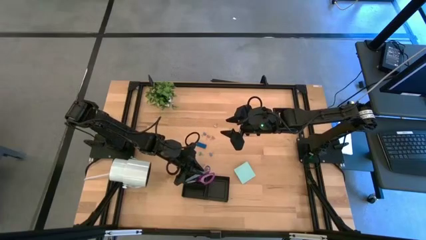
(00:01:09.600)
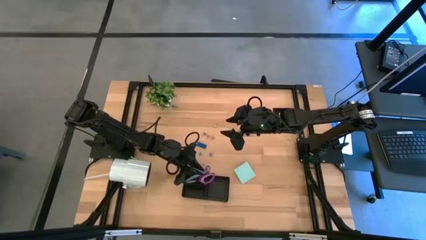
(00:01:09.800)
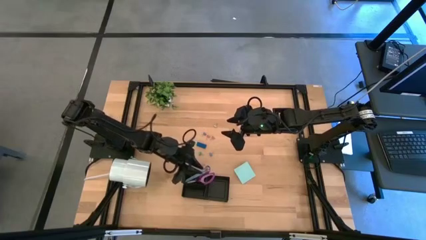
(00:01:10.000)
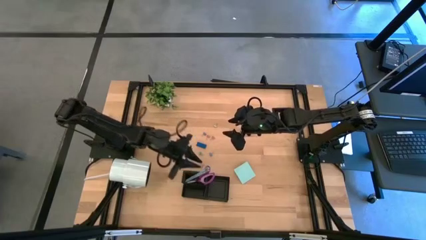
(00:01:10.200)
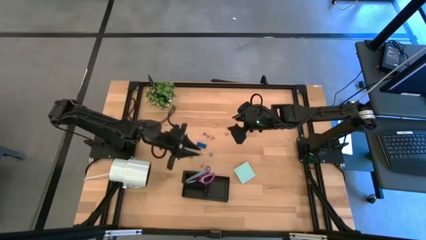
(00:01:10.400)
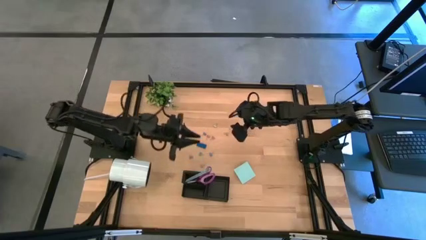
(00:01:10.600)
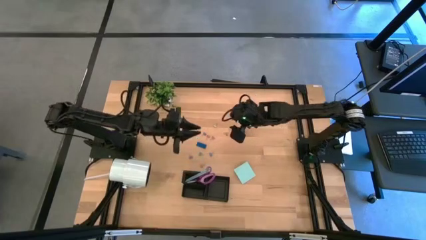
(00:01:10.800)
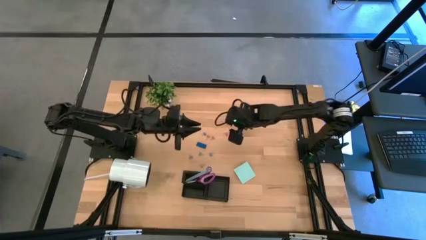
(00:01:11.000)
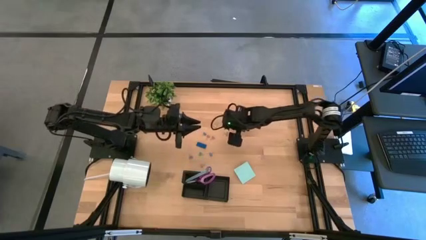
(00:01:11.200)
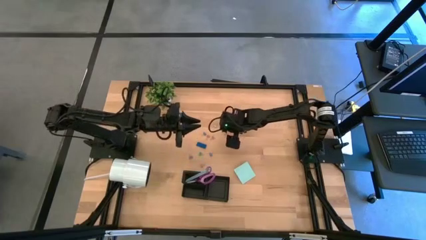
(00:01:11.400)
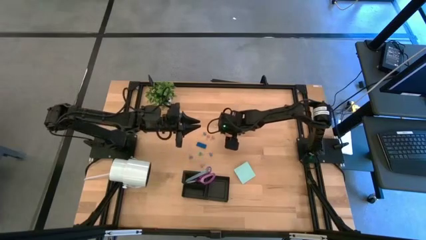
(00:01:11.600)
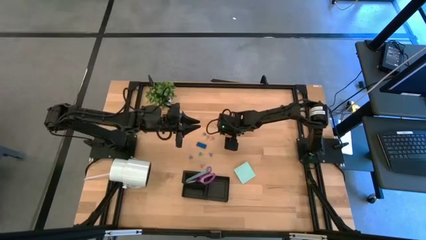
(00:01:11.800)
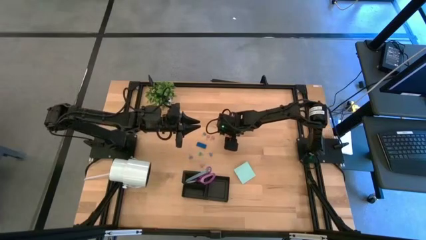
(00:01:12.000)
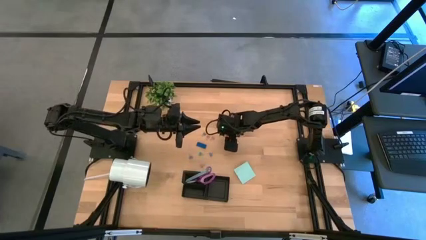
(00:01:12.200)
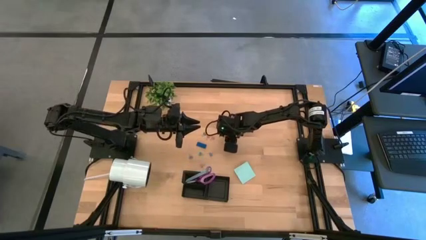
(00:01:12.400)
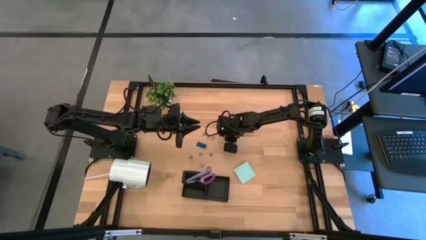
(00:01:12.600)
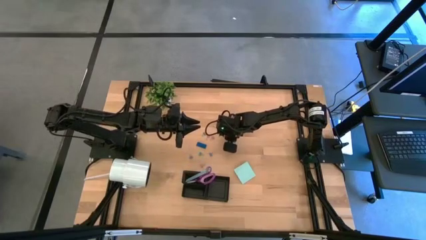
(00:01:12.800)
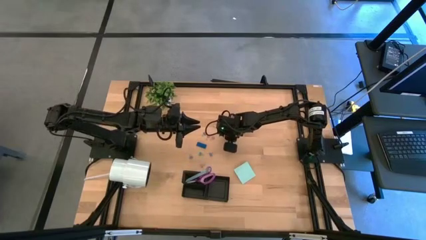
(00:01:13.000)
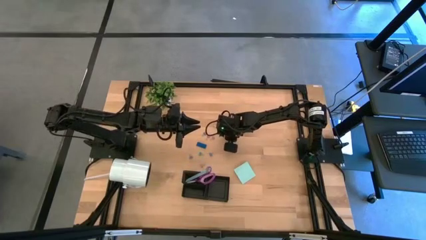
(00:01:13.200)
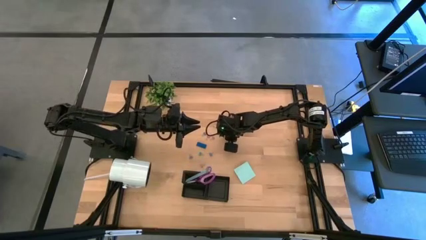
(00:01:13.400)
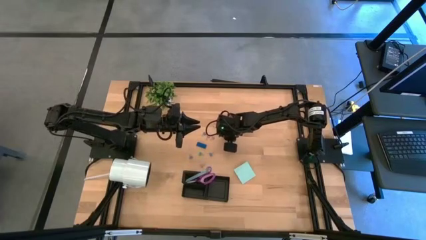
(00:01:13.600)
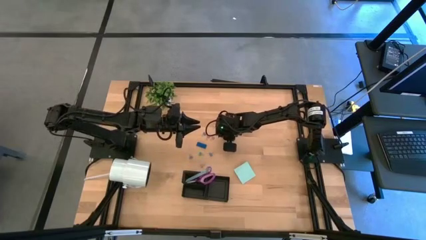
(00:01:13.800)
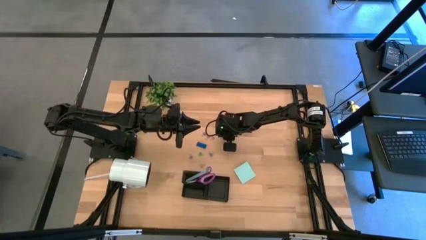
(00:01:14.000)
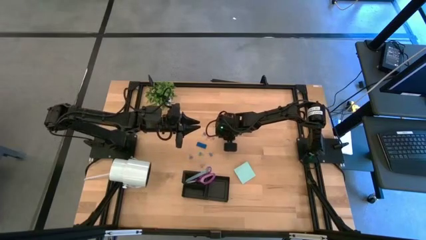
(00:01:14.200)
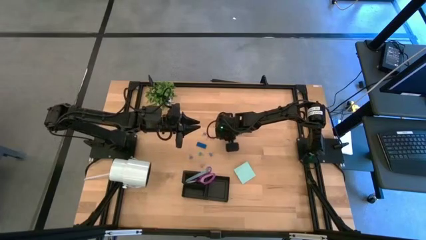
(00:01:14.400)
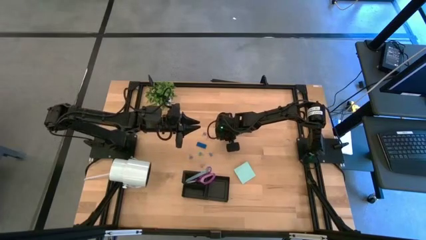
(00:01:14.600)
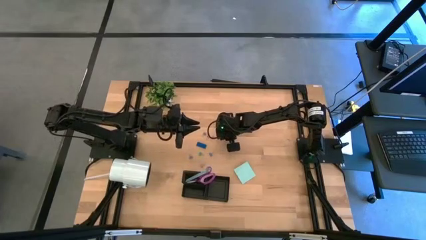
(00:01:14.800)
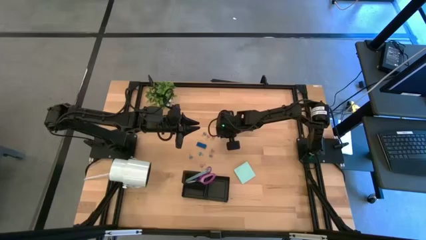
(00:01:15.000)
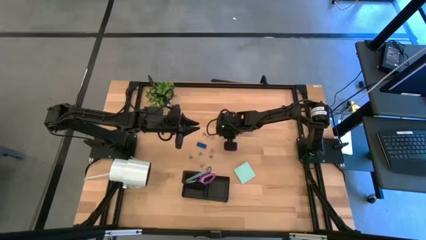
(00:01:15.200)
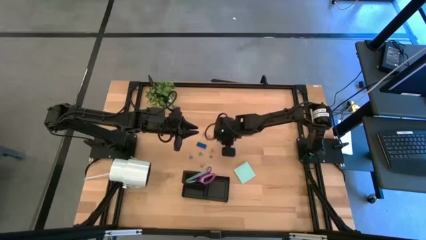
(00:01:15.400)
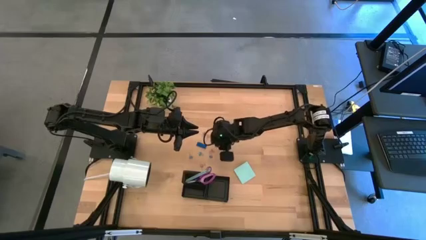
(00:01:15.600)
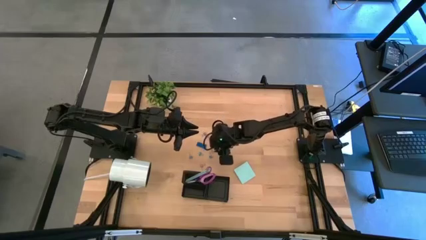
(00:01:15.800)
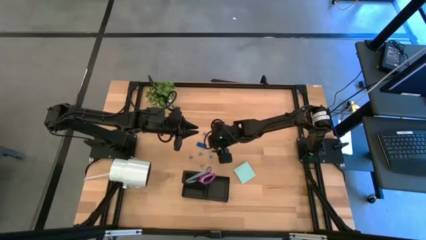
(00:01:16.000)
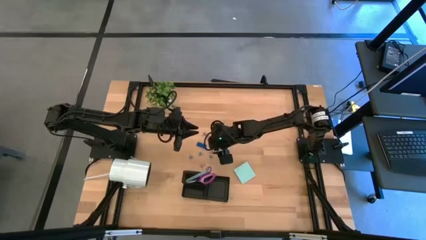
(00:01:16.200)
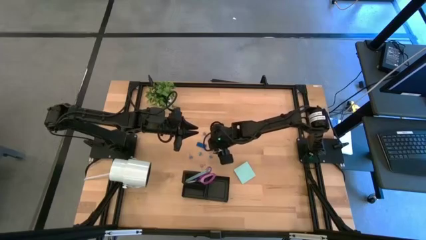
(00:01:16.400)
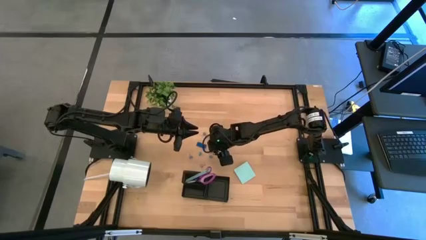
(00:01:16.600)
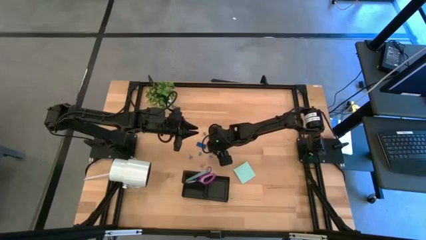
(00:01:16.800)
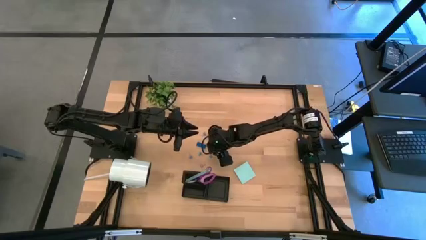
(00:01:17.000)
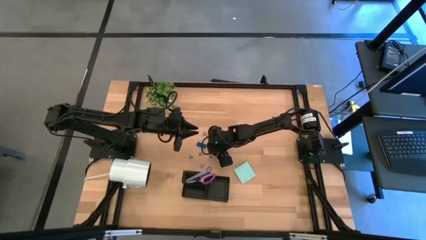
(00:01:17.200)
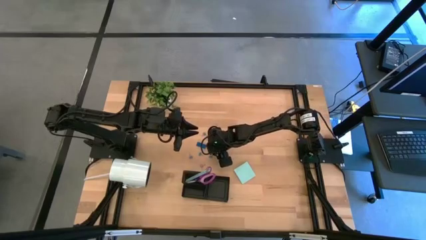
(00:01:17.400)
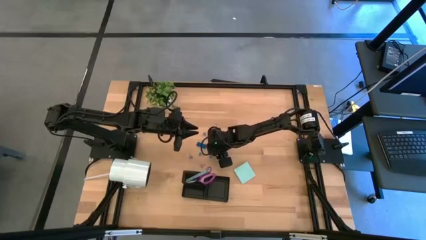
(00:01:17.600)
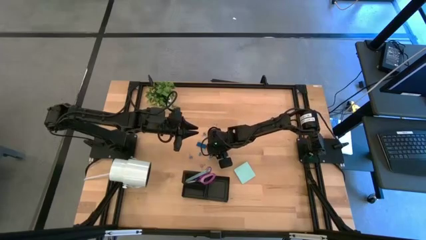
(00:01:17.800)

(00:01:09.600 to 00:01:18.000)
Task: Pick and place office supplies into organizer
Put the pink binder clip into the desk organizer

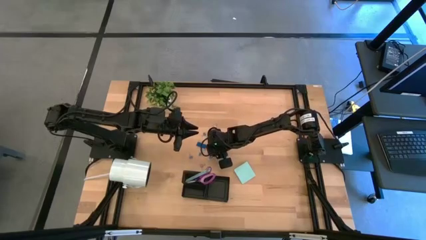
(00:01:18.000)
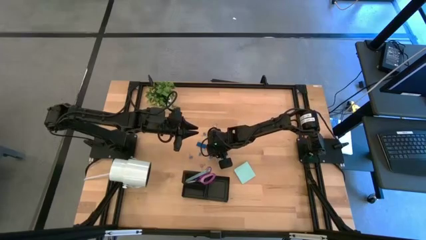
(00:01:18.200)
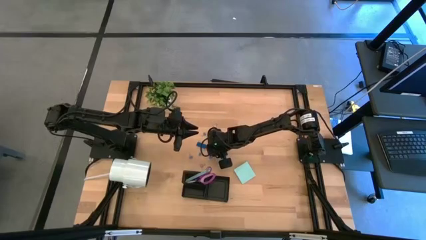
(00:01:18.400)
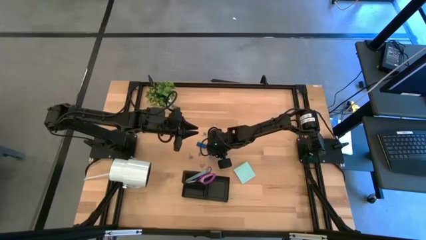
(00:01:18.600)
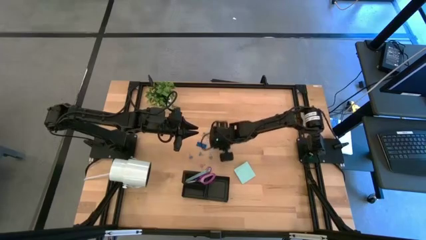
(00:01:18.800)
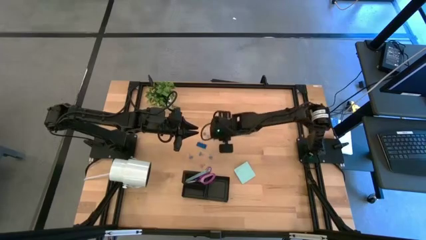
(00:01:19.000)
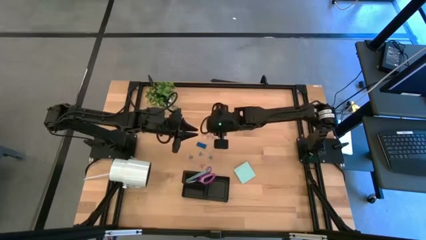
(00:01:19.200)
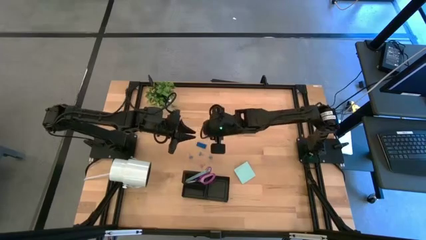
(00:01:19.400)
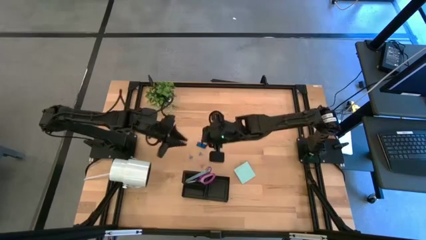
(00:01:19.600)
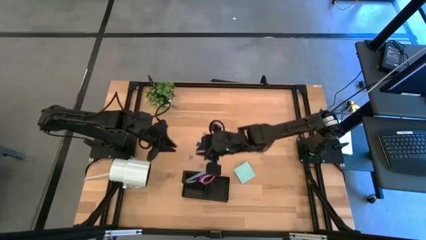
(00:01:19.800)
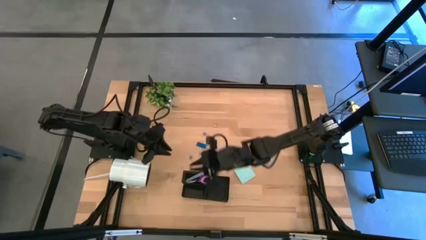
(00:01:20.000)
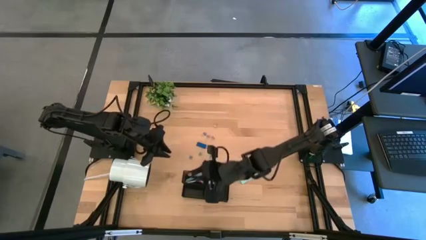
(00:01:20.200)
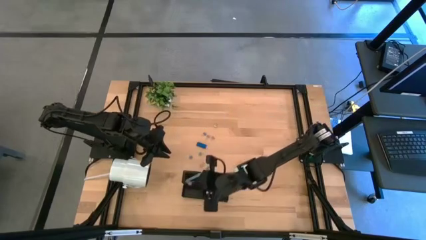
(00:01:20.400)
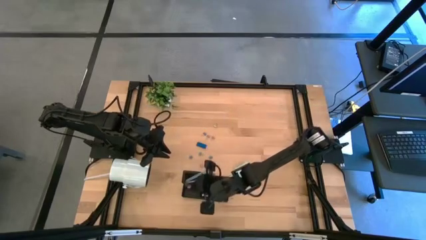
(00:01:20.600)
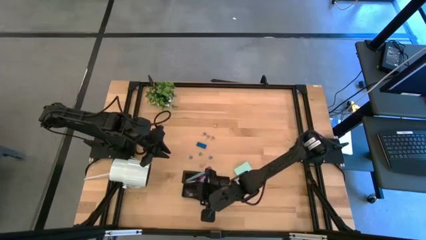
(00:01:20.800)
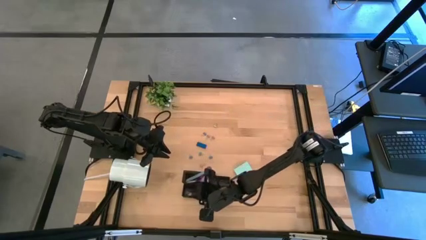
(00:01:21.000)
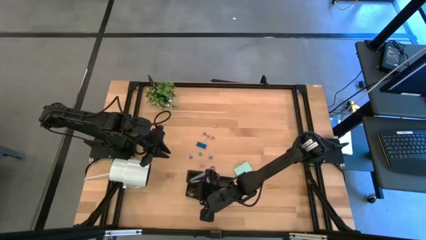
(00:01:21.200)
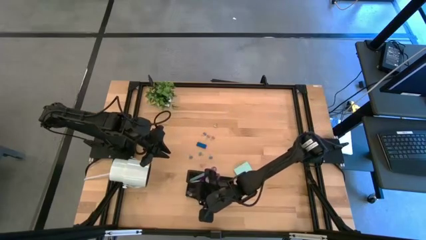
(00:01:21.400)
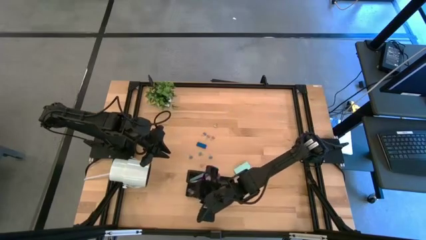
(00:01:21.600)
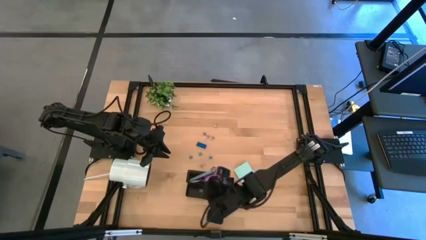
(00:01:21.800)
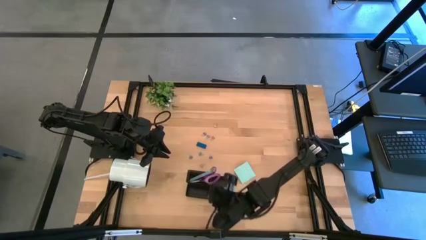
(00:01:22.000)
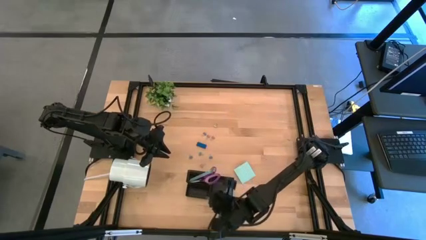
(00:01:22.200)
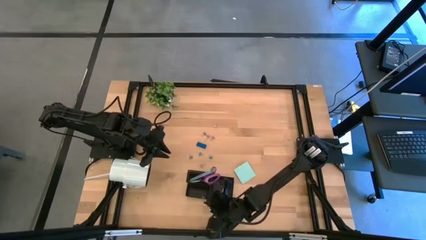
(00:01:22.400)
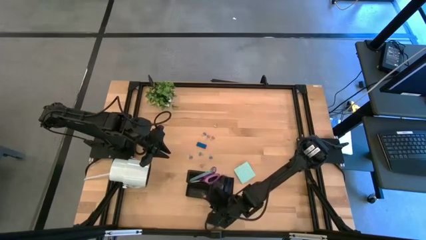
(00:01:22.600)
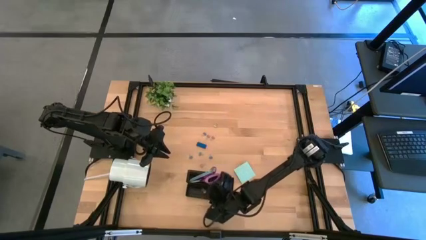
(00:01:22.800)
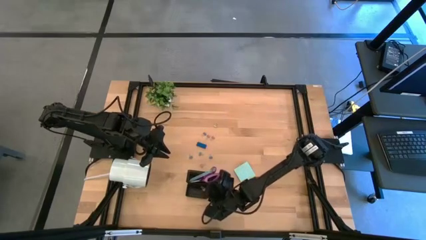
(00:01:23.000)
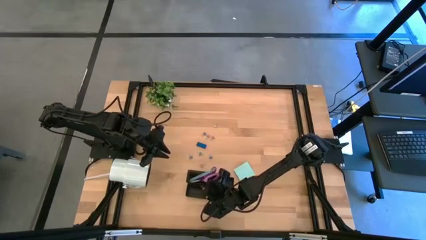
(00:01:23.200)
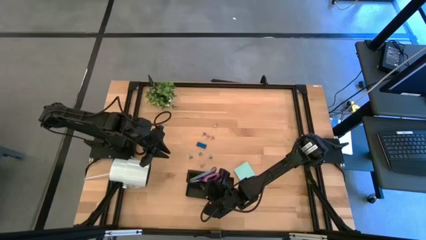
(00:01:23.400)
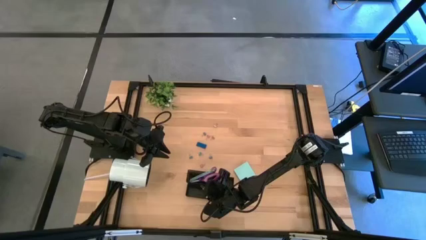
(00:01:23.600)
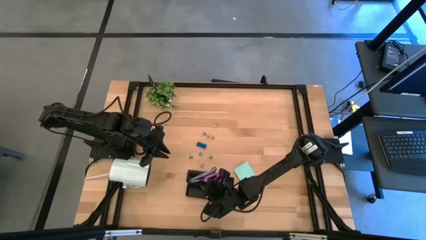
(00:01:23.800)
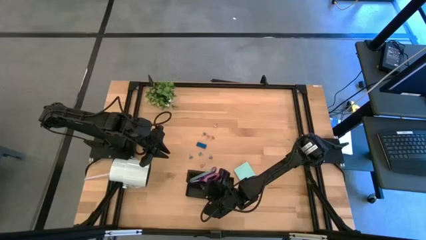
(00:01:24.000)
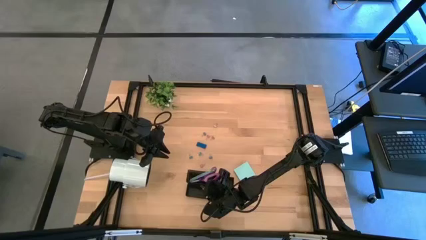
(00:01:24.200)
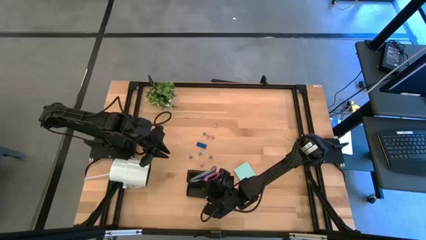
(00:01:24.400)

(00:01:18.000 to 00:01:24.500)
Put the binder clip into the desk organizer

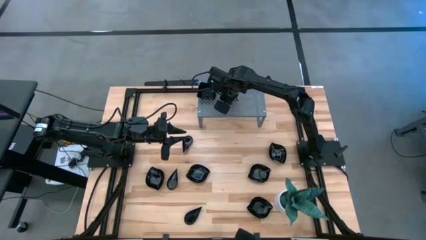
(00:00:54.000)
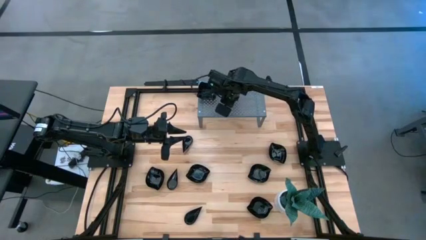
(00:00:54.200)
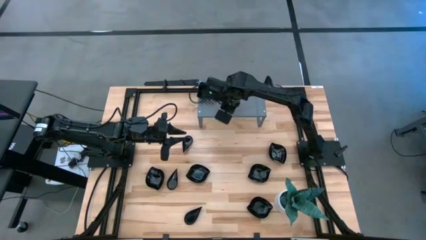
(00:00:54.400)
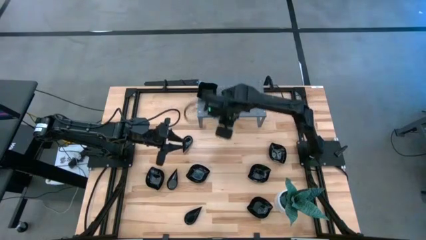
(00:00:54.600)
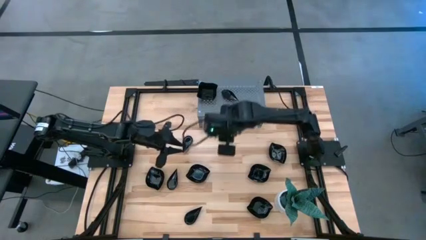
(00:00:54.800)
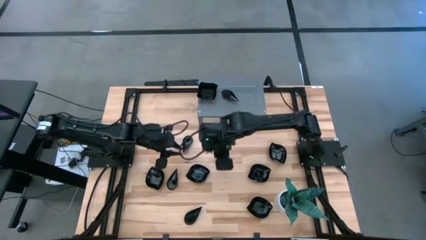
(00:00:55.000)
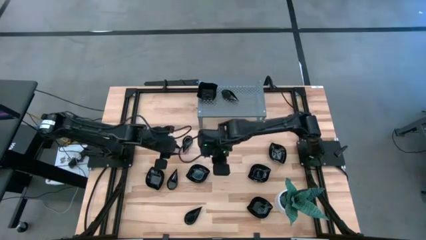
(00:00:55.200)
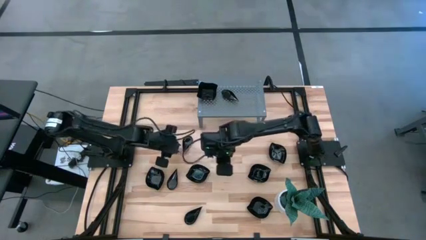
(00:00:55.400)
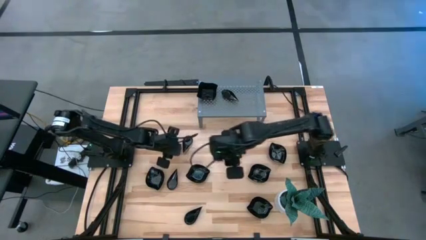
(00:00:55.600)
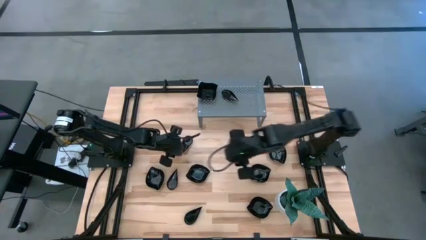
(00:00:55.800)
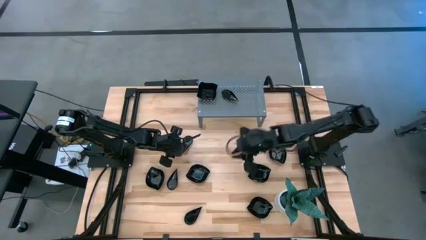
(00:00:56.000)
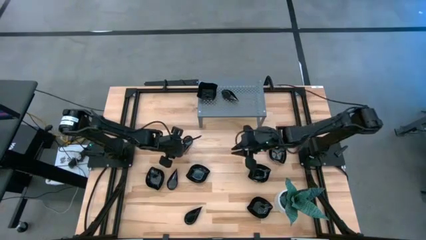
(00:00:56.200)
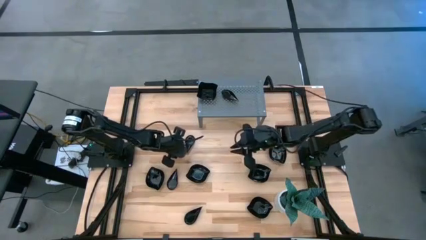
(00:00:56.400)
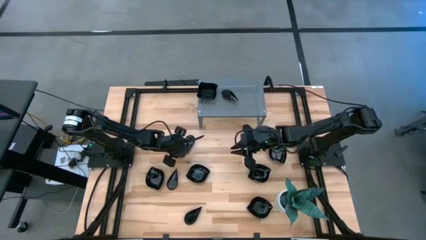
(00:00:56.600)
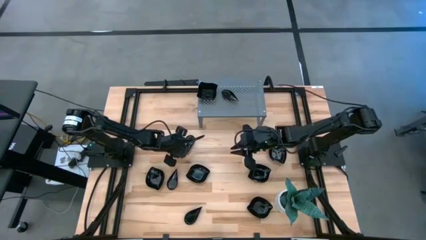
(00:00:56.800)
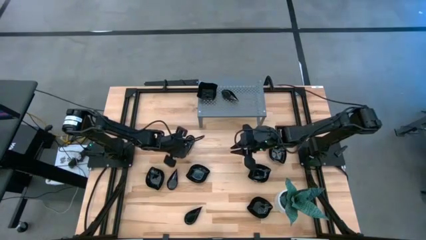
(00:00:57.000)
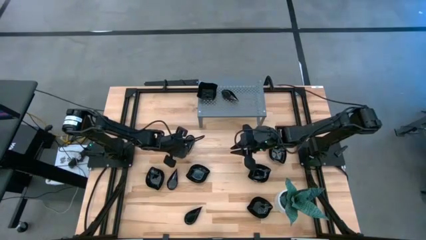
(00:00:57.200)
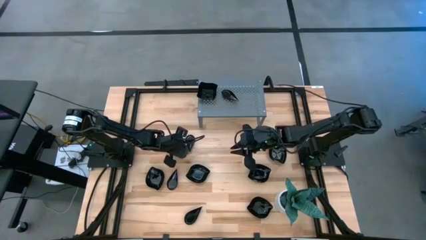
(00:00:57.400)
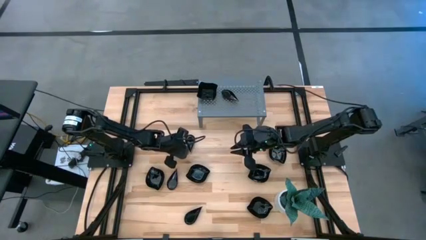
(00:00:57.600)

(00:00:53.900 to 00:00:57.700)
Task: Pick & Place Mini shaped plates
Stack the drop-shaped plate on top of the drop-shaped plate on the shelf
